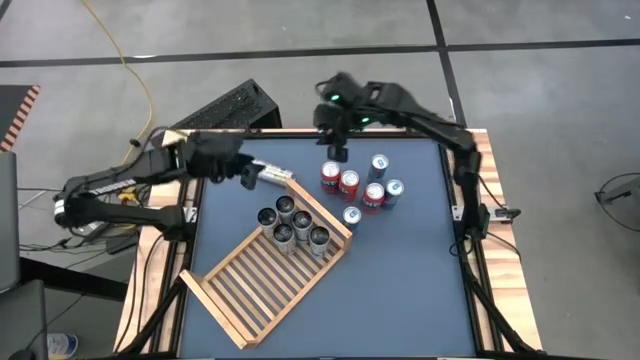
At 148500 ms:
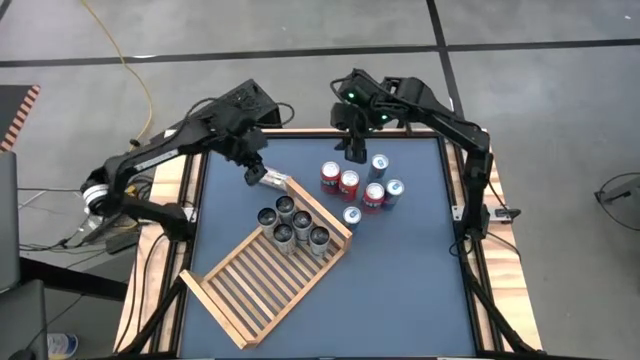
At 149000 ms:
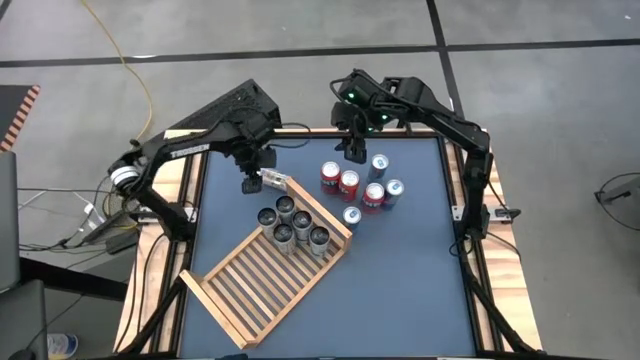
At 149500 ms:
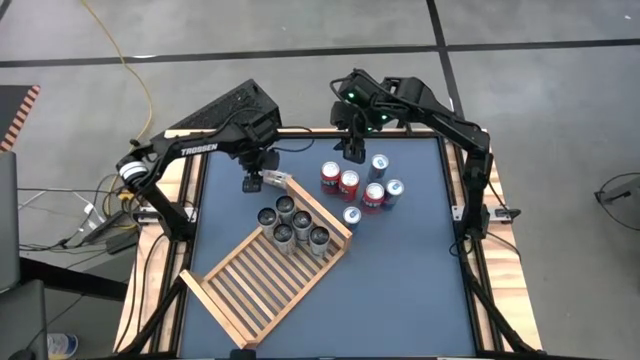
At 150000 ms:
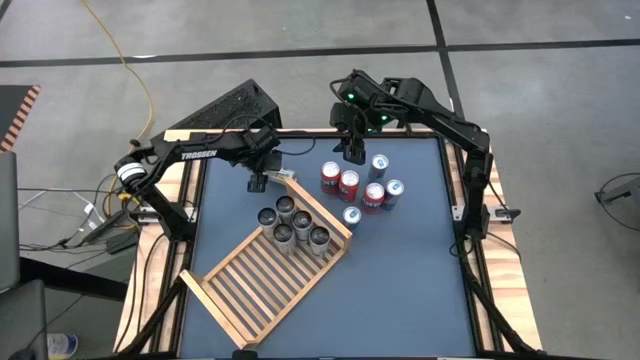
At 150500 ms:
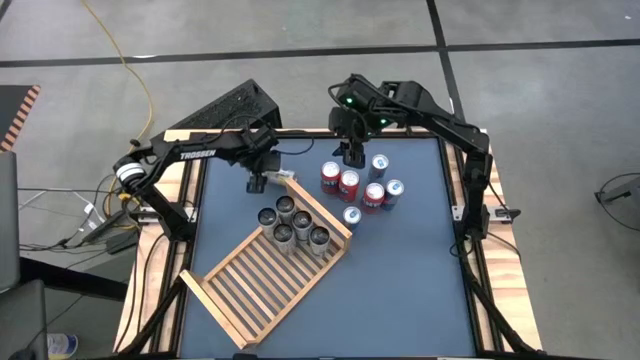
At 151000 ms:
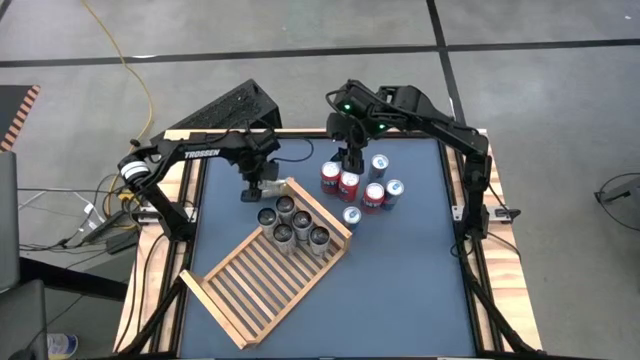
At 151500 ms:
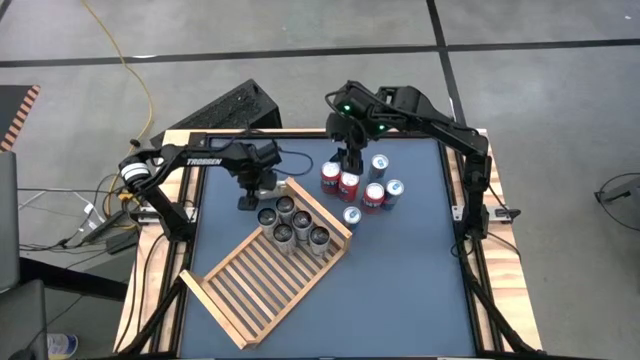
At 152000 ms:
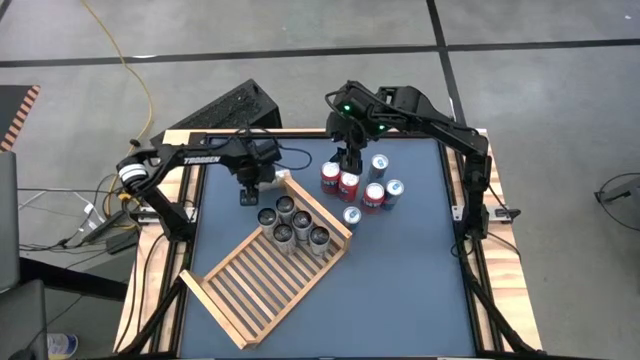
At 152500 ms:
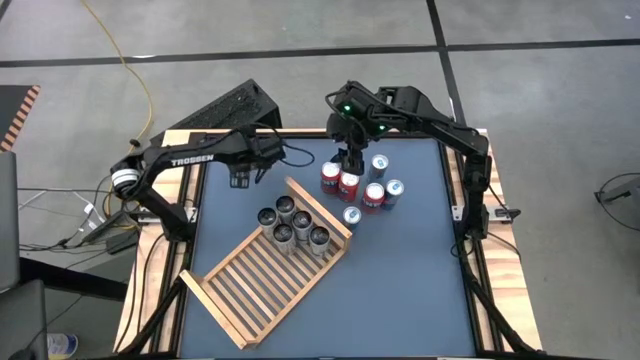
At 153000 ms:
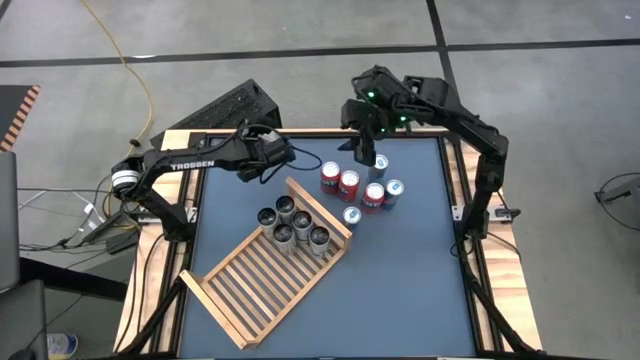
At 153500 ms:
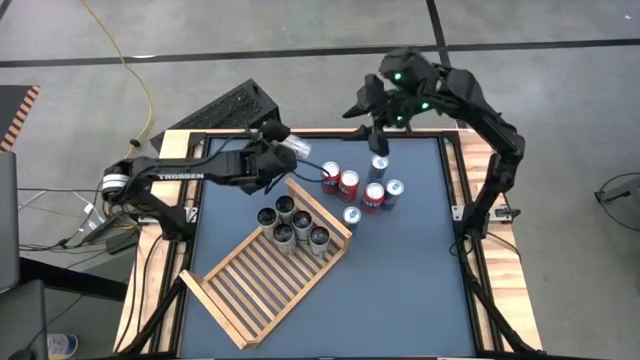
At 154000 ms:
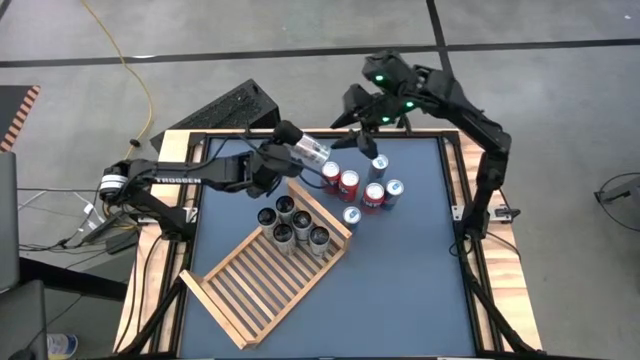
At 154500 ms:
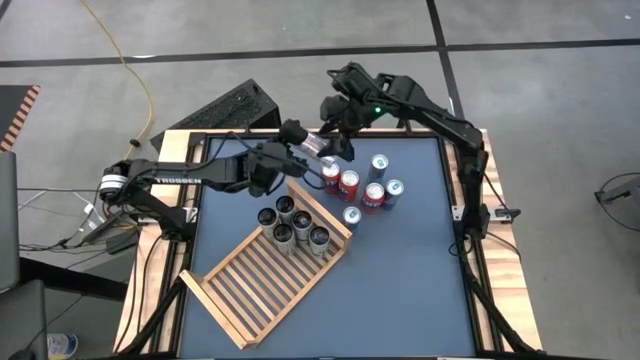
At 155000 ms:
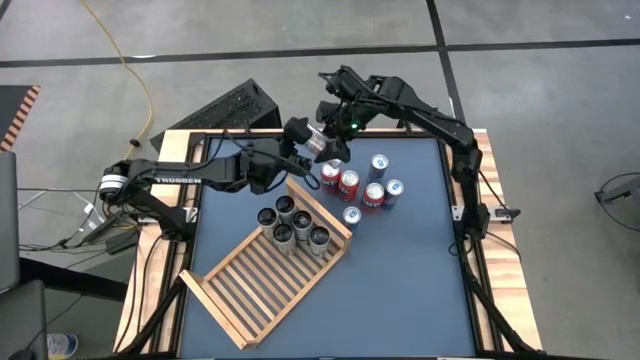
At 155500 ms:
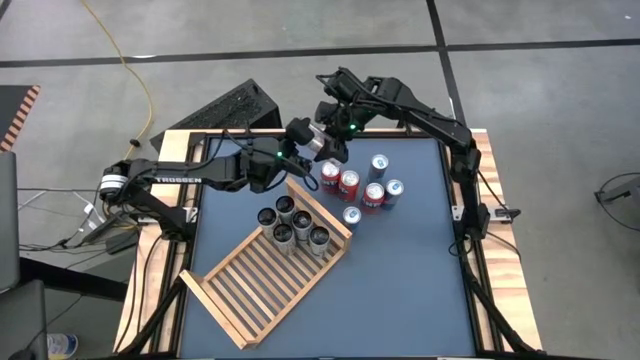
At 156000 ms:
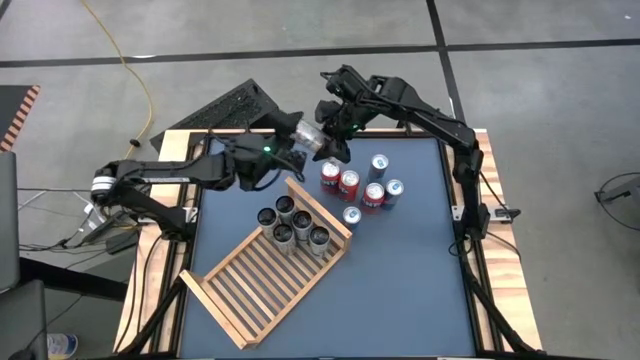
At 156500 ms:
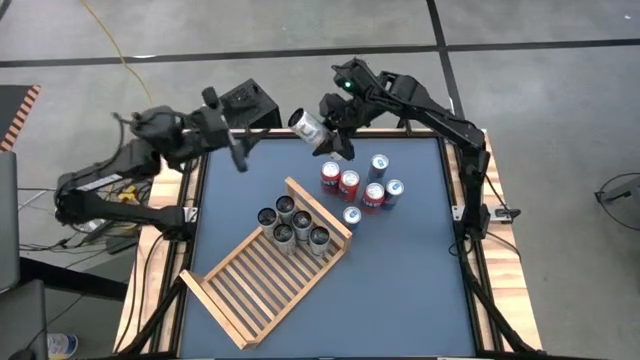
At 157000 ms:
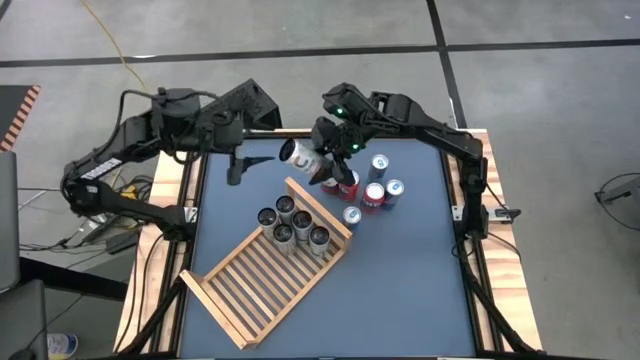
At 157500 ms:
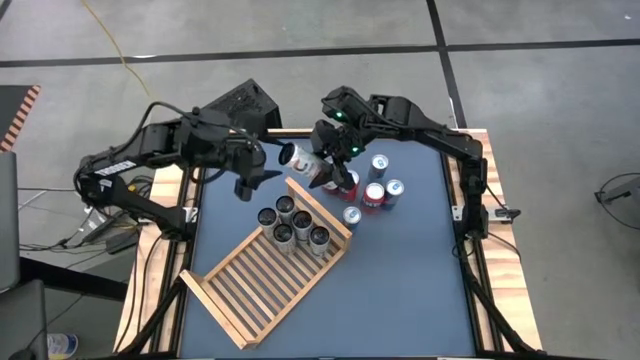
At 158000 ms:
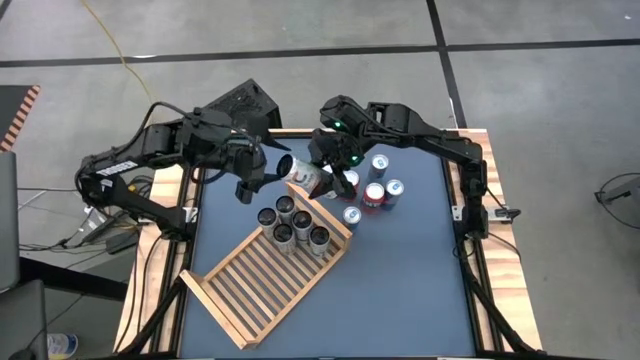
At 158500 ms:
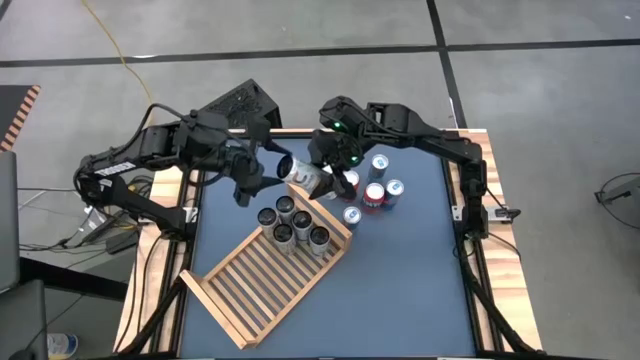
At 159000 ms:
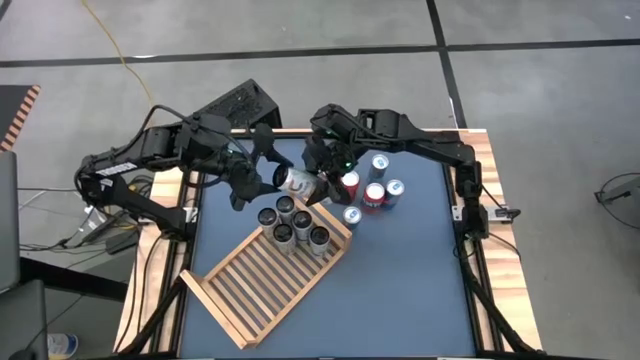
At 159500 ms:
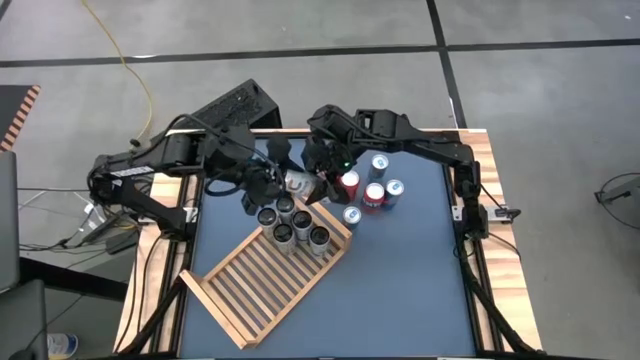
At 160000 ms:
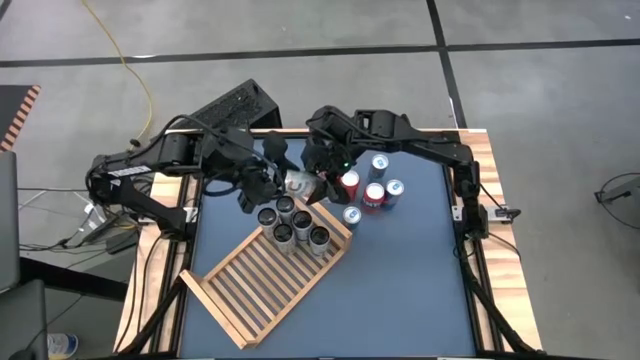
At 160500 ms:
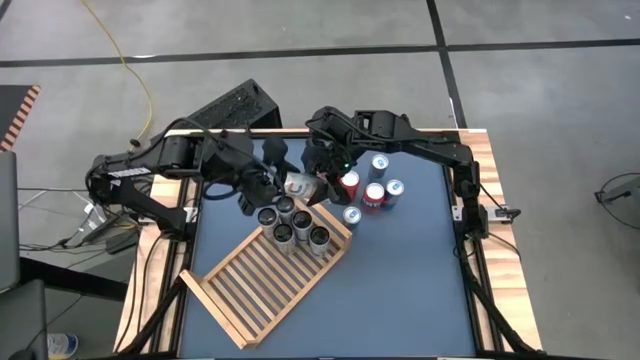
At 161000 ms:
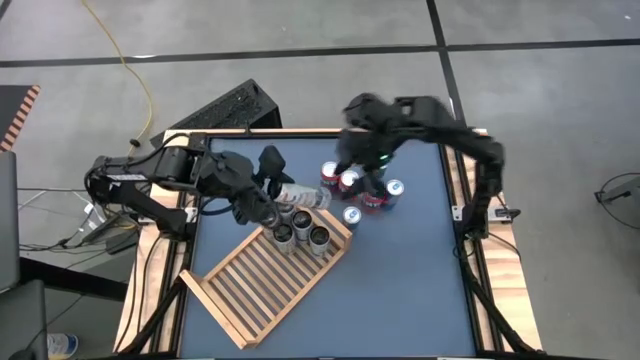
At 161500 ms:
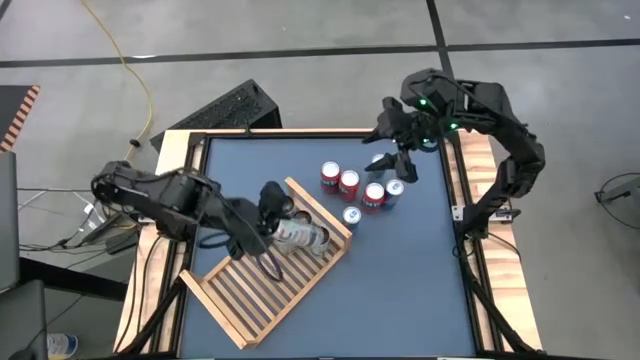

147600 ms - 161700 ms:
Task: Place canned beverage on shelf
Put the white yellow soda can on the shelf aligned with the other white yellow soda cans

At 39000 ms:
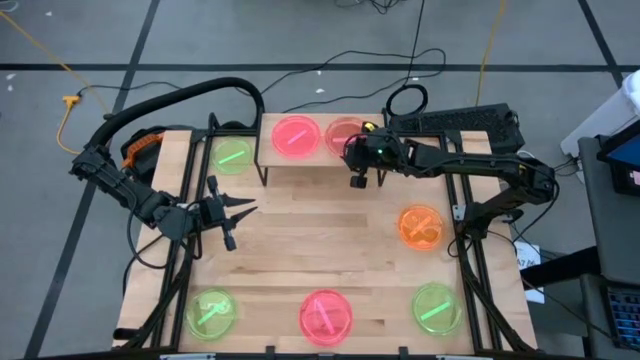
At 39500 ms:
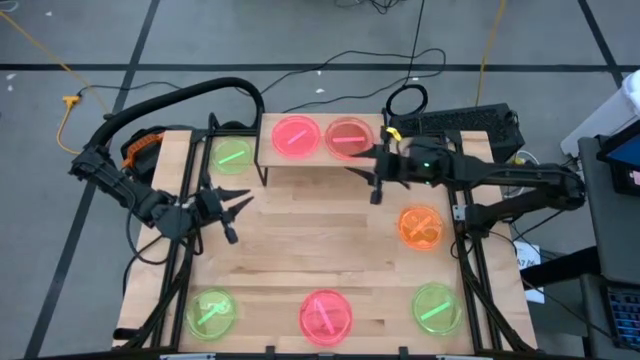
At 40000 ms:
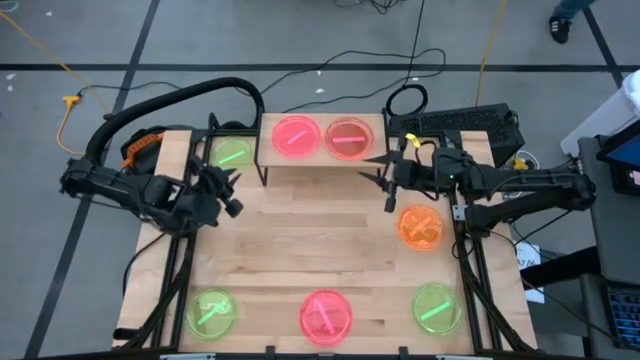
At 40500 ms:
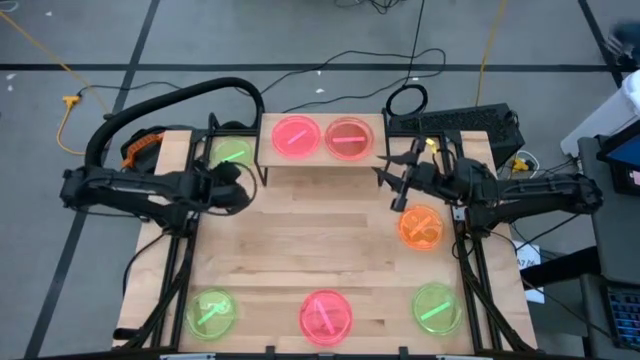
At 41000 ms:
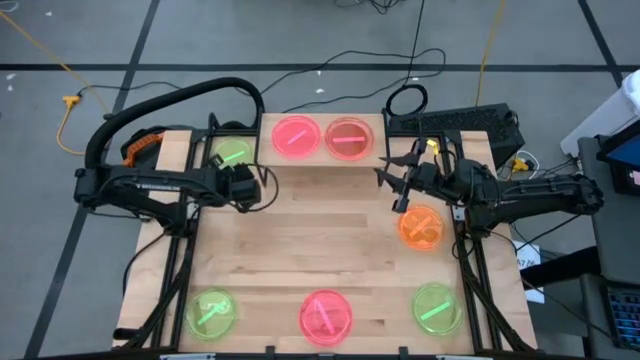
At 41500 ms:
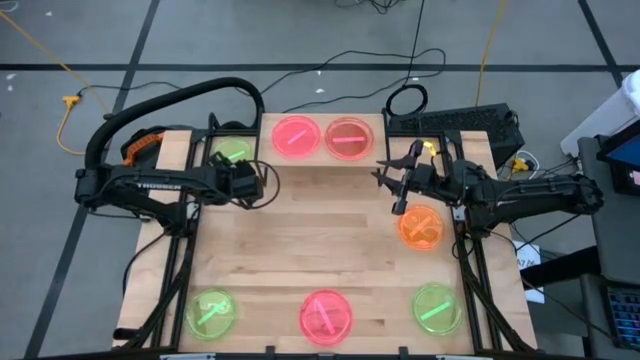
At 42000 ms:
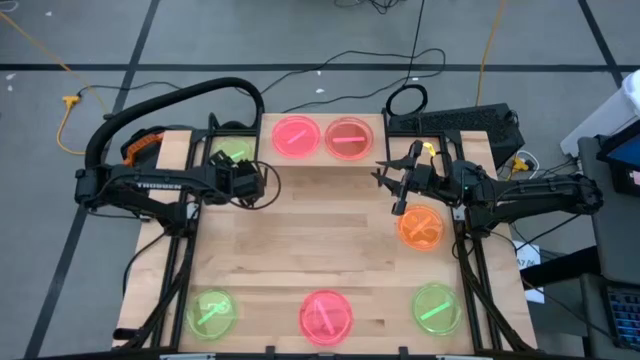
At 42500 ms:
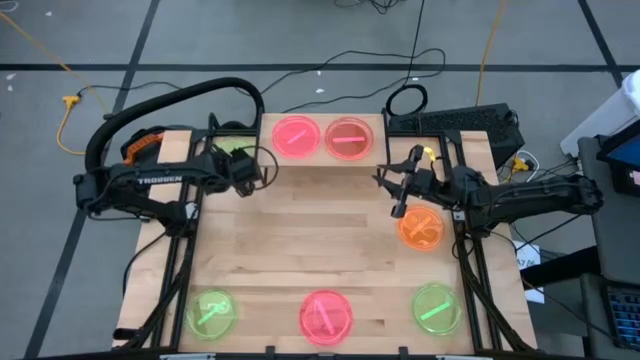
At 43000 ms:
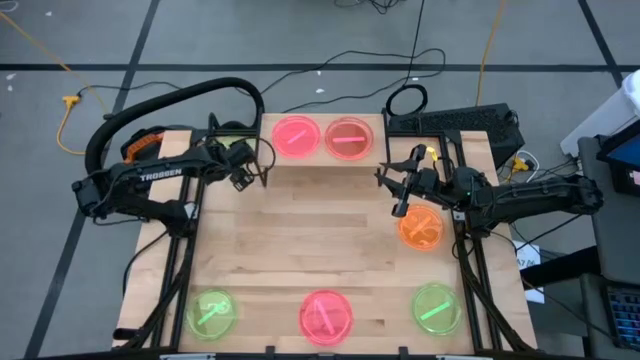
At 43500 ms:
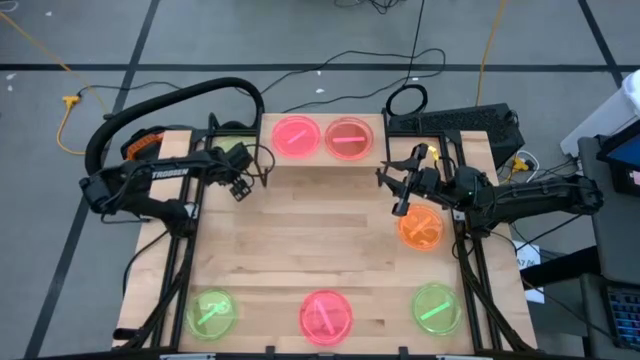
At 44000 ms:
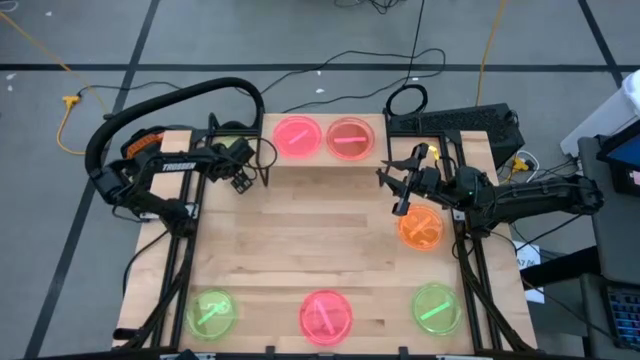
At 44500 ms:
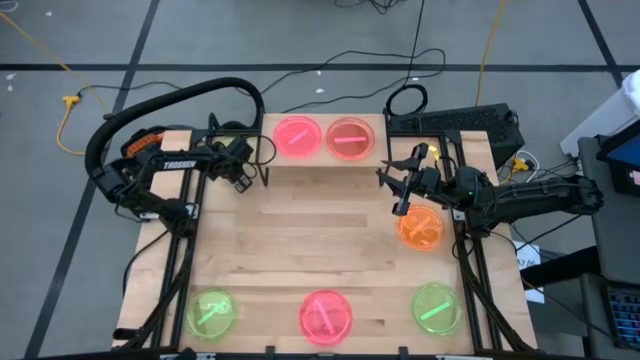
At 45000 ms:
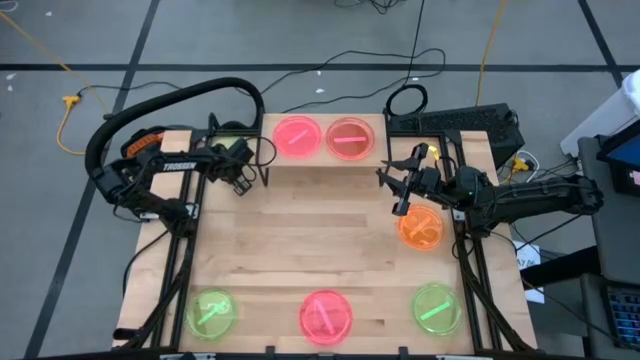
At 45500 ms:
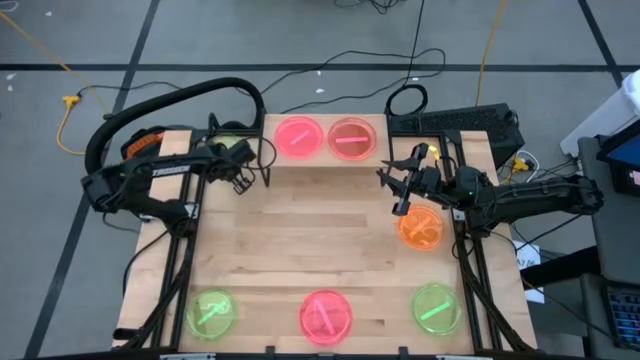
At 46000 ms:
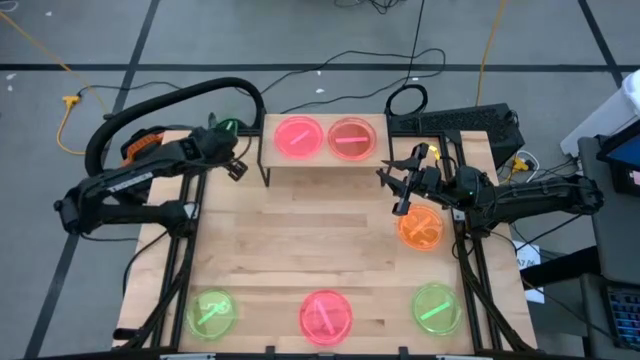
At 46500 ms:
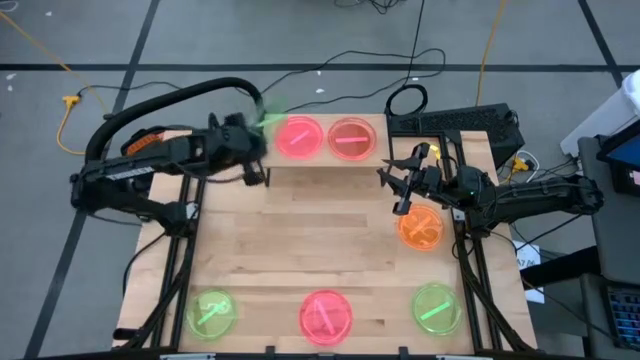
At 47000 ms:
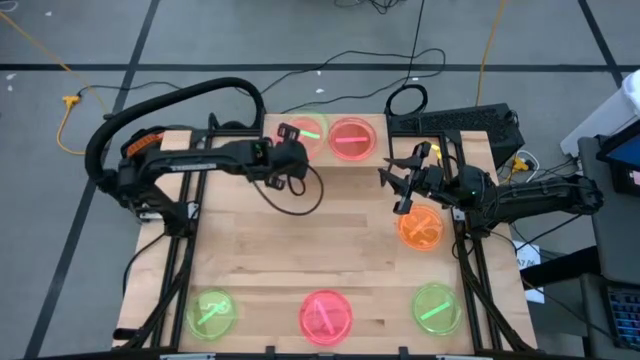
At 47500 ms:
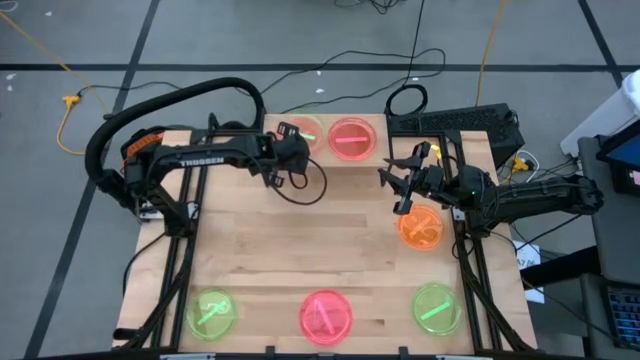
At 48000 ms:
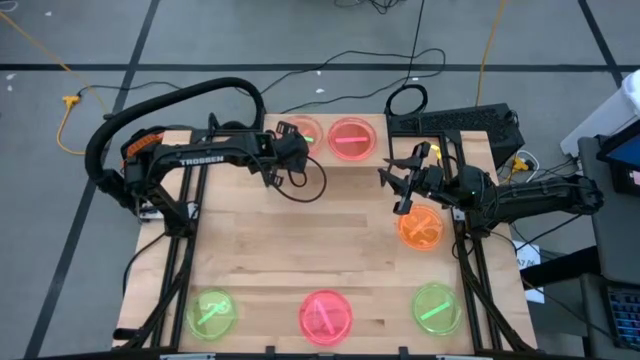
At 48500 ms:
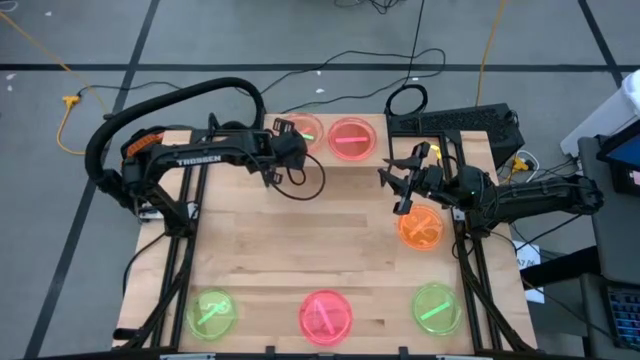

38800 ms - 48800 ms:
Task: Place and stack plates onto a shelf
Stack the green plate on top of the pink plate on the shelf
